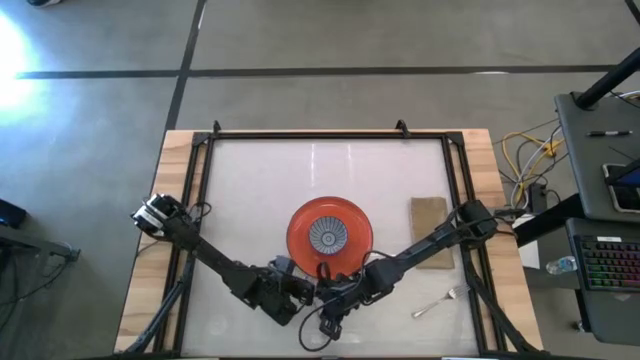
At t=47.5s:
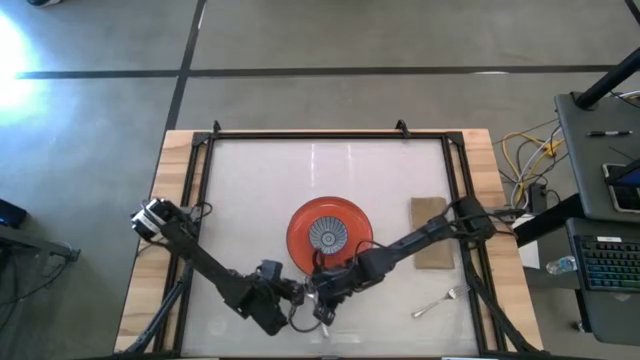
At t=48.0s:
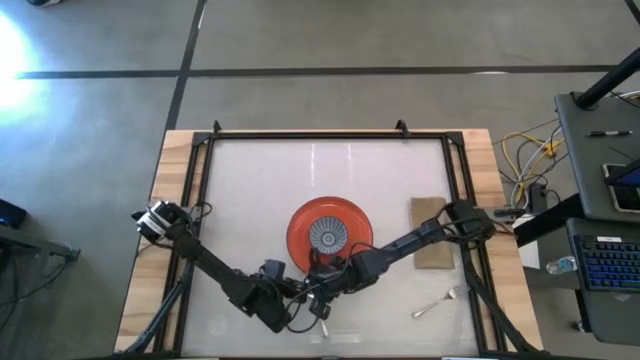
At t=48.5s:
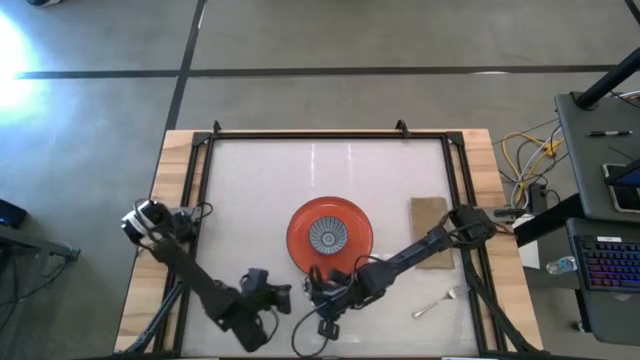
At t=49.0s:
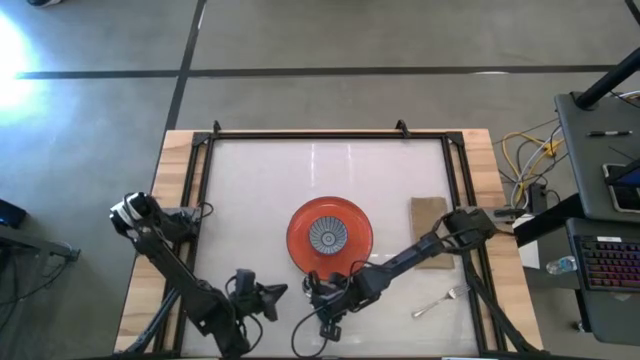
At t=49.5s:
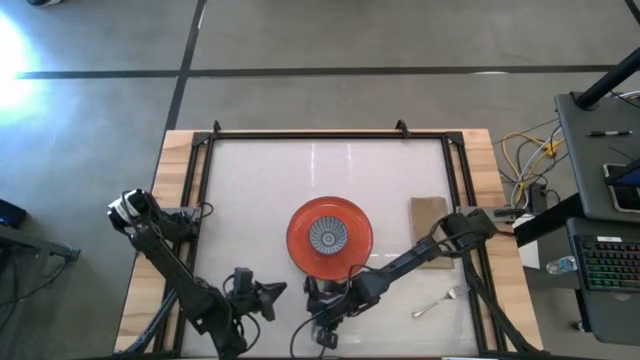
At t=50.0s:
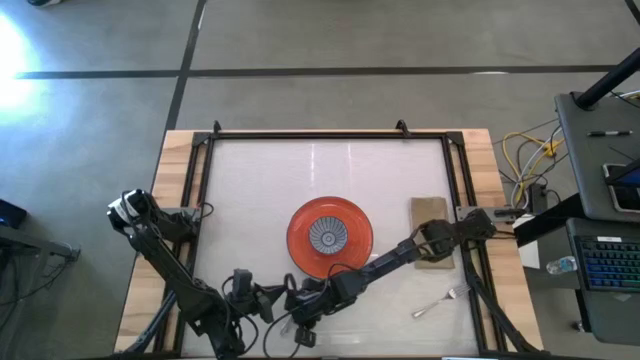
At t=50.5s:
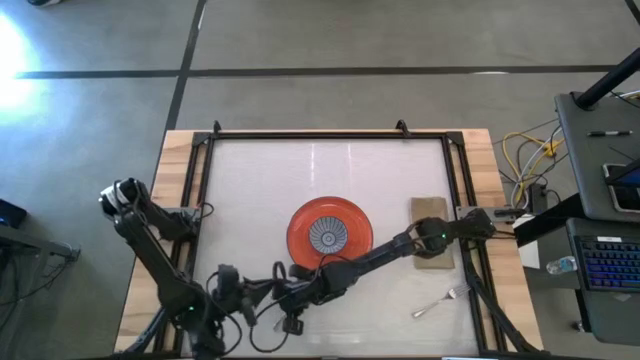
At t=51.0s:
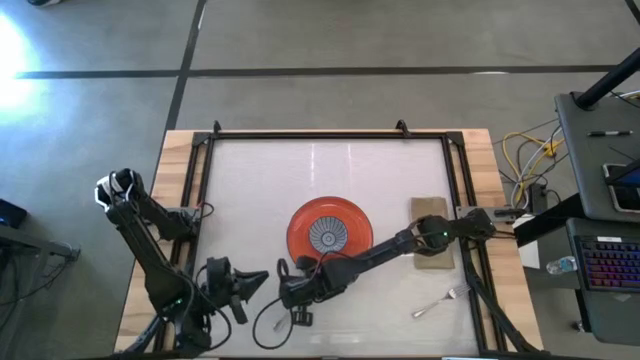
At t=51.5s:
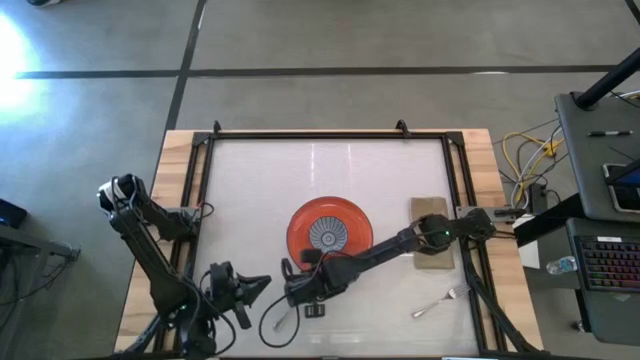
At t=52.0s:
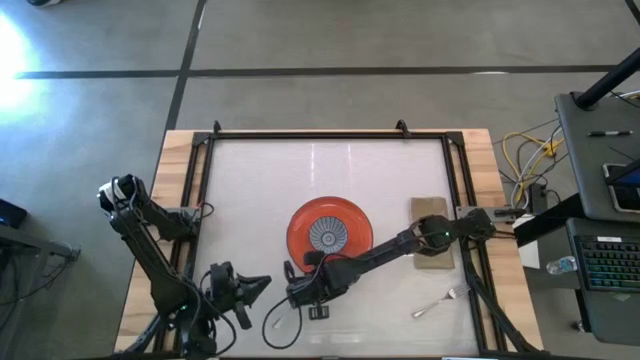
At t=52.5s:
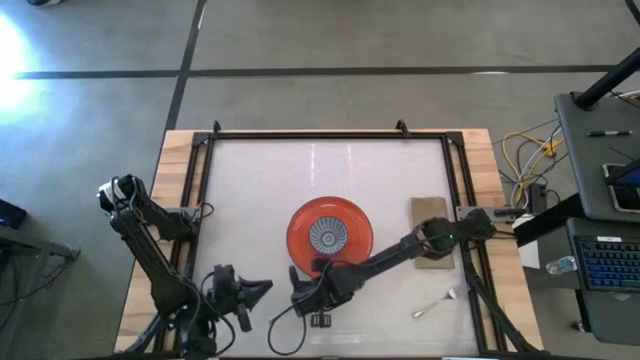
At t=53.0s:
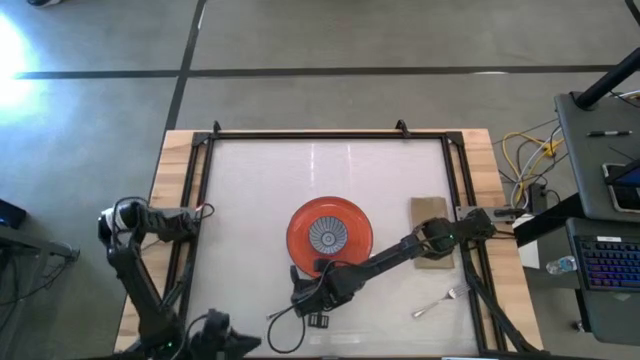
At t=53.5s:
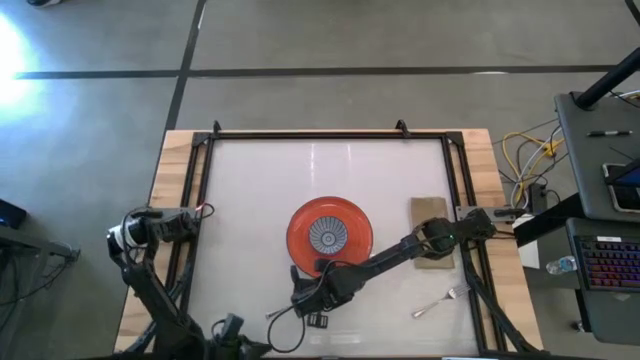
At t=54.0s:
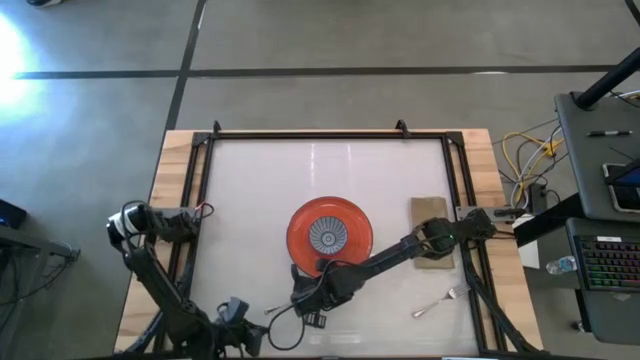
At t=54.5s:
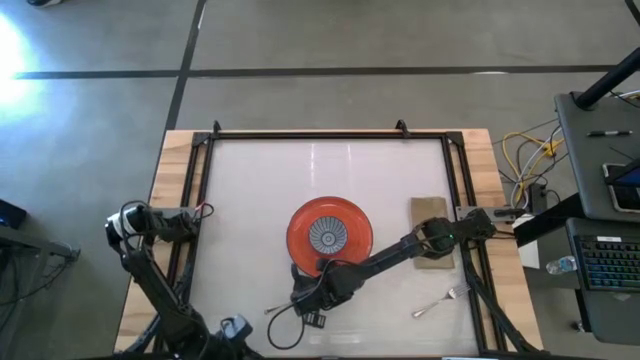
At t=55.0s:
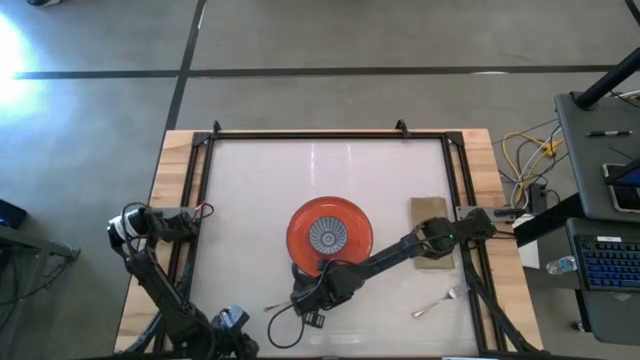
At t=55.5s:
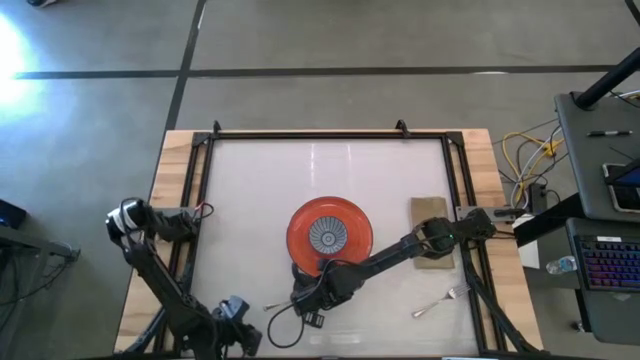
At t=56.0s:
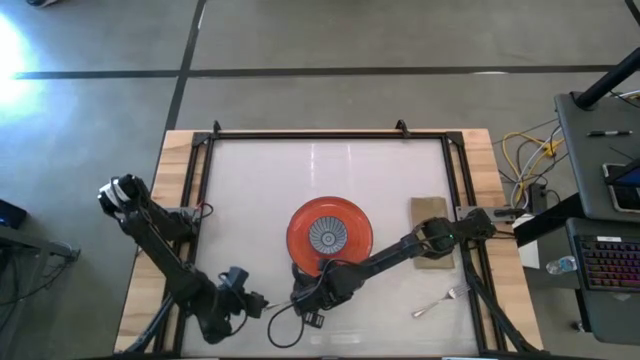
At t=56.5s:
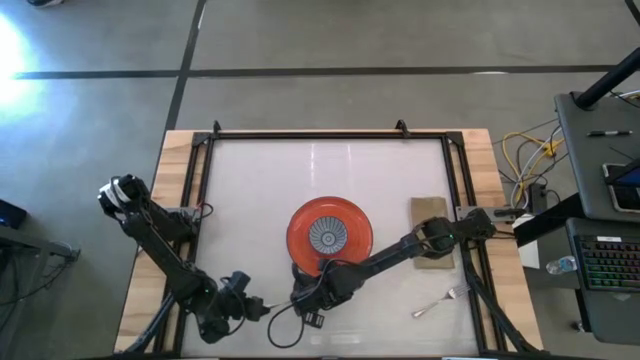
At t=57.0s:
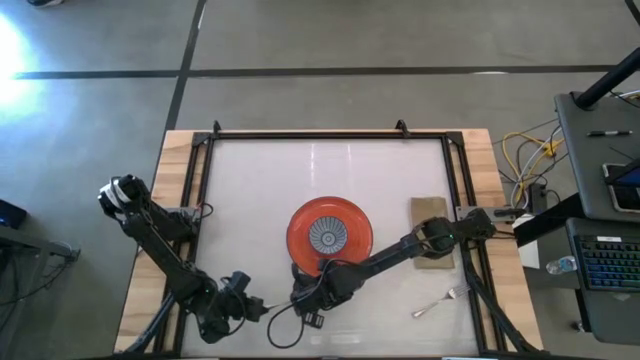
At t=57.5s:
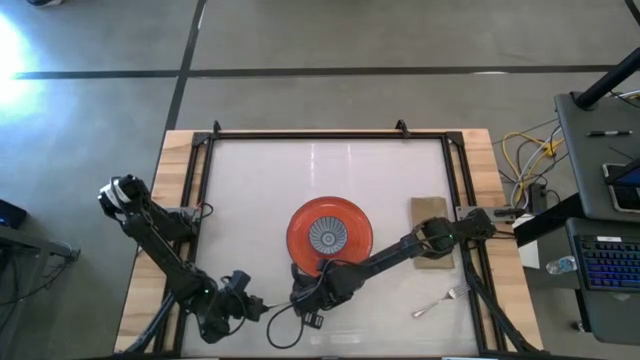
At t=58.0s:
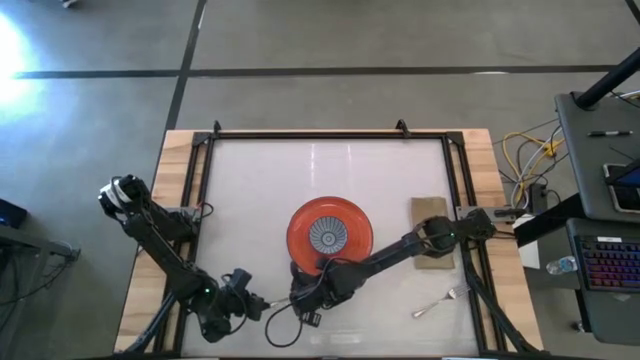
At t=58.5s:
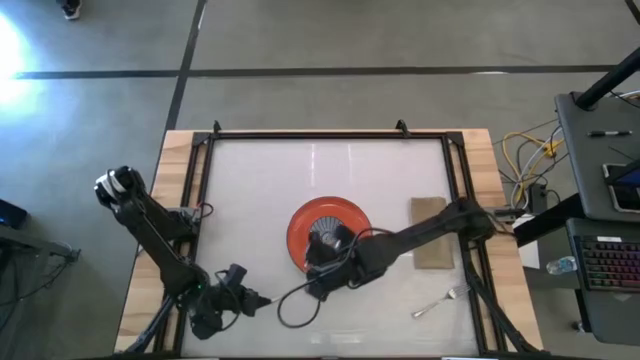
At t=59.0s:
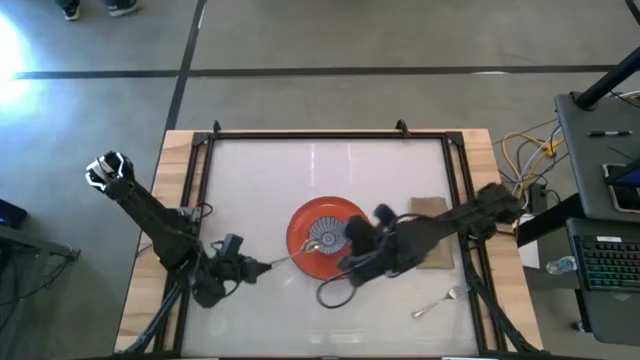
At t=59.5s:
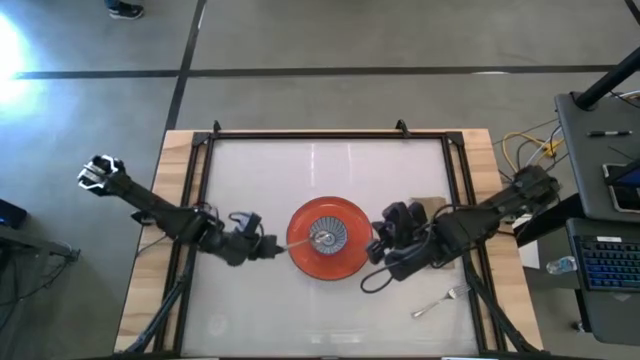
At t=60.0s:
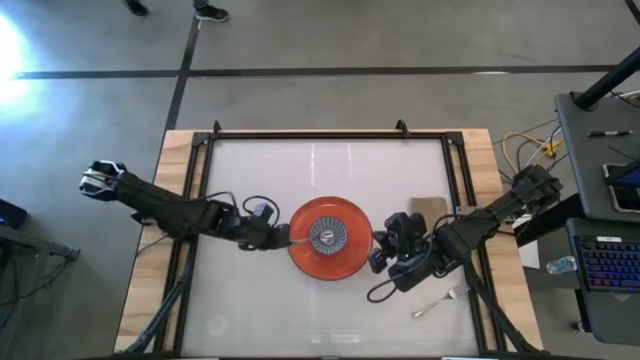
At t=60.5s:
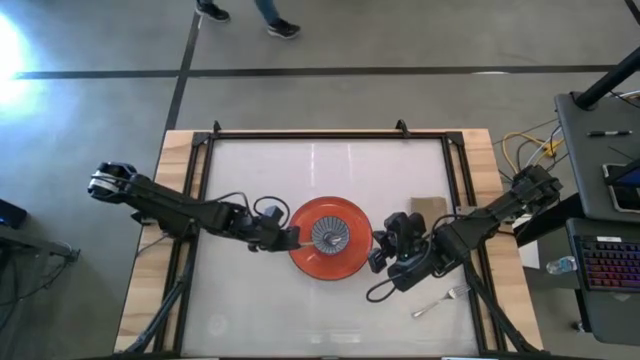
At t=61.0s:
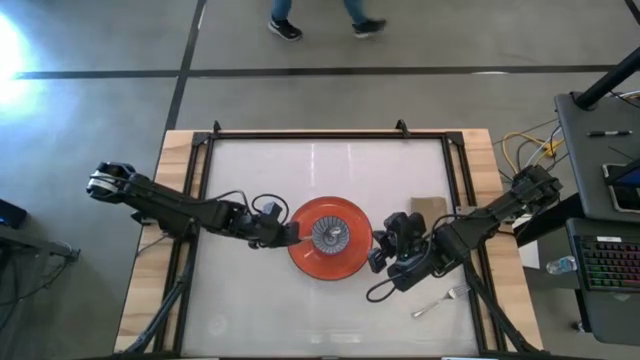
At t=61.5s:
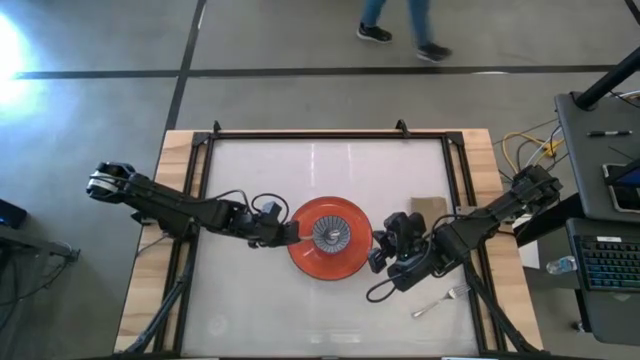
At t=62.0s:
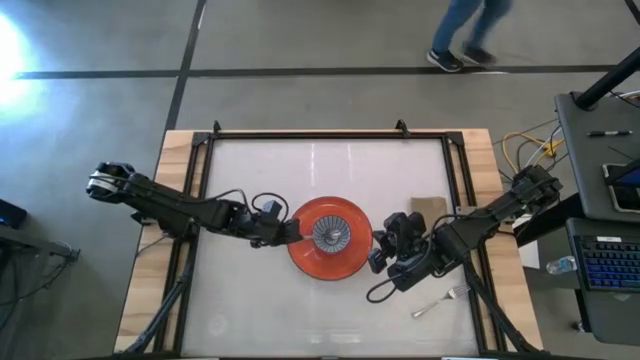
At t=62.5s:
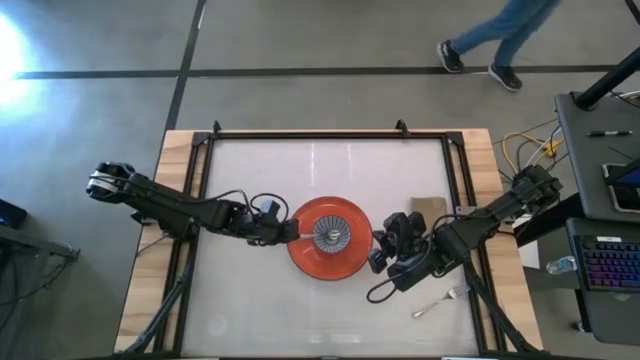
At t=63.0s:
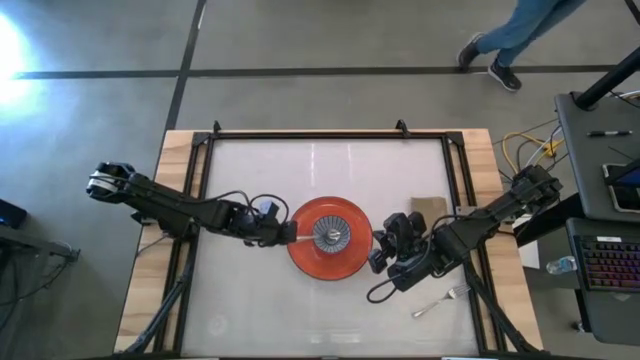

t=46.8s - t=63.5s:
Task: Set table place
Put the spoon into the blue bowl

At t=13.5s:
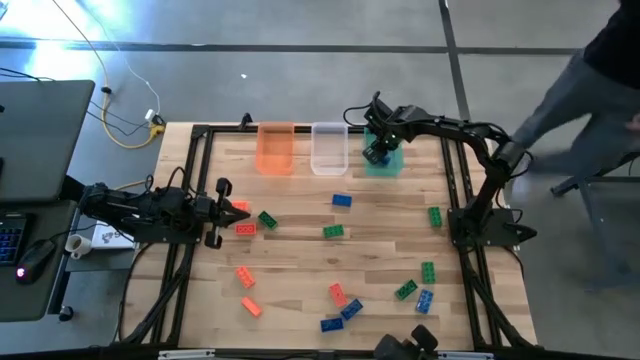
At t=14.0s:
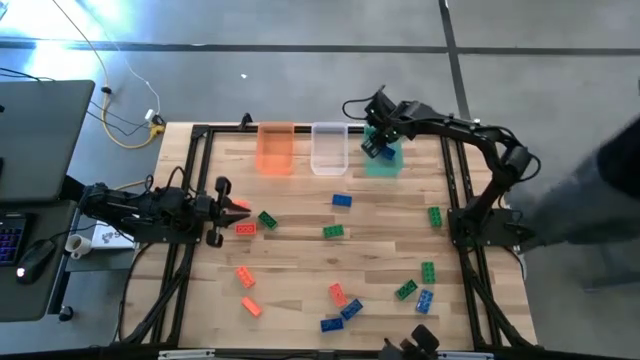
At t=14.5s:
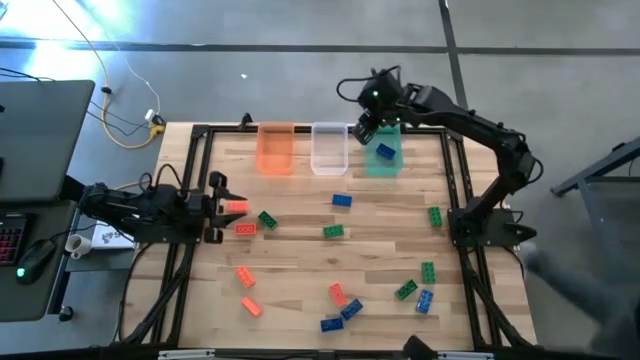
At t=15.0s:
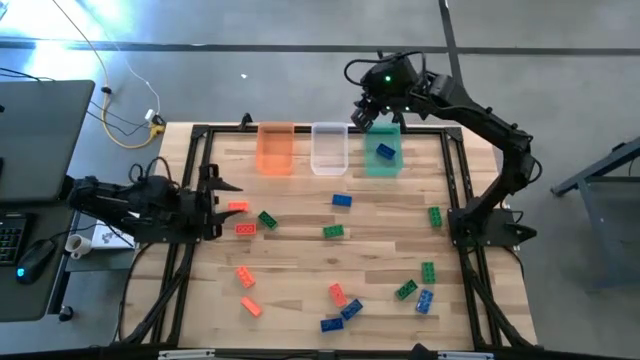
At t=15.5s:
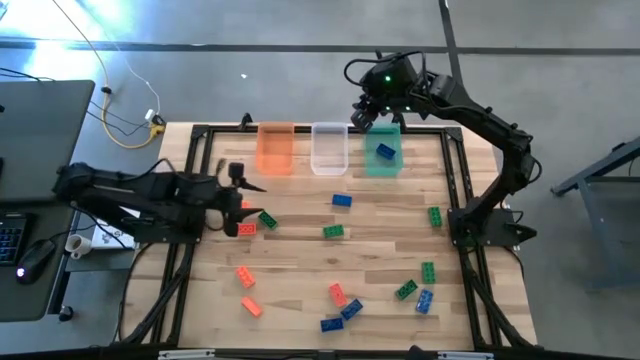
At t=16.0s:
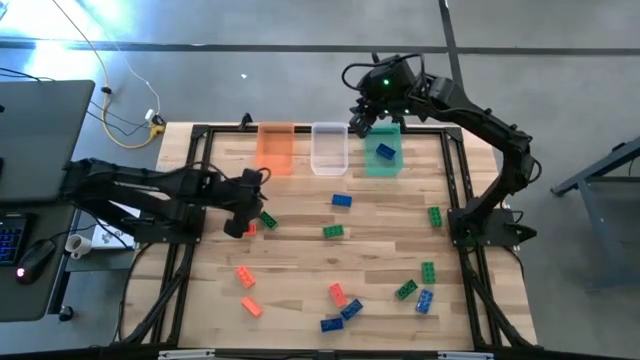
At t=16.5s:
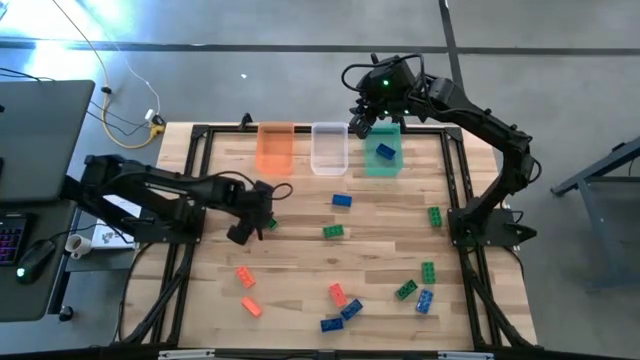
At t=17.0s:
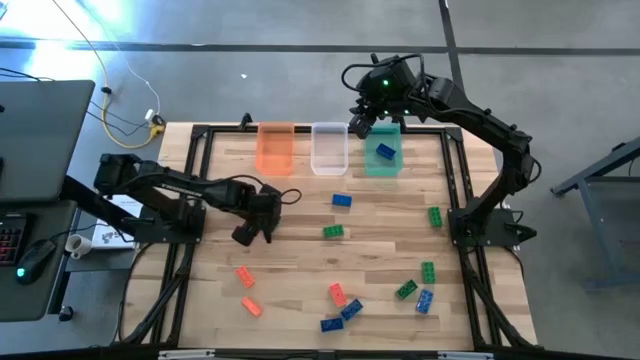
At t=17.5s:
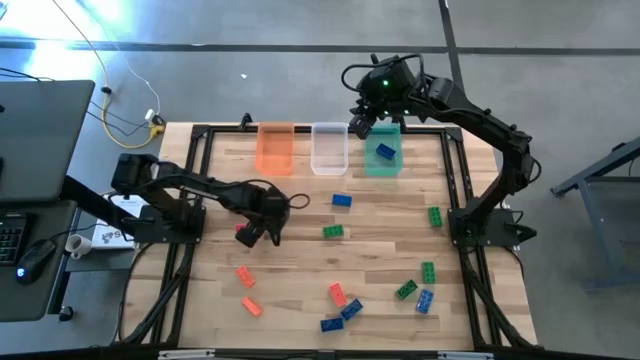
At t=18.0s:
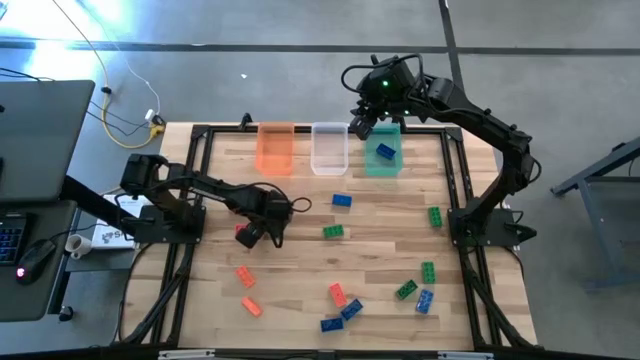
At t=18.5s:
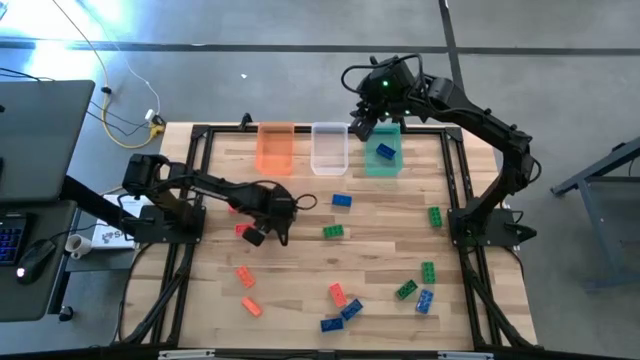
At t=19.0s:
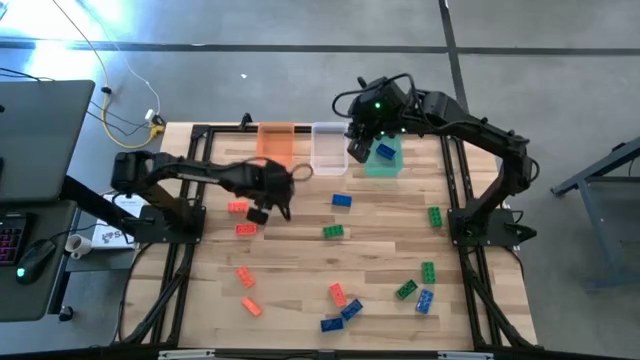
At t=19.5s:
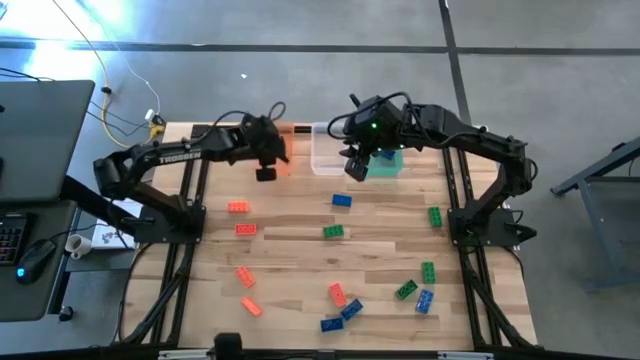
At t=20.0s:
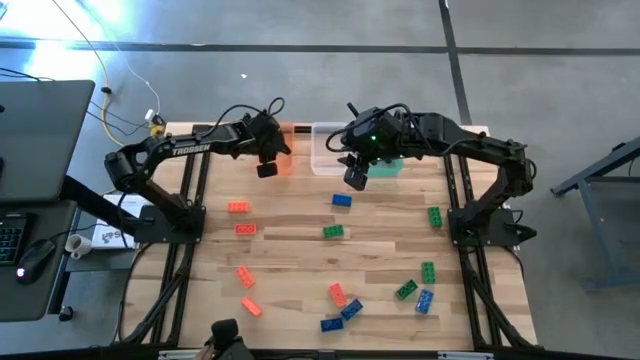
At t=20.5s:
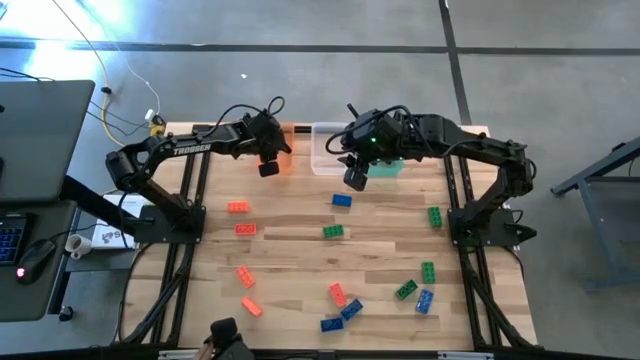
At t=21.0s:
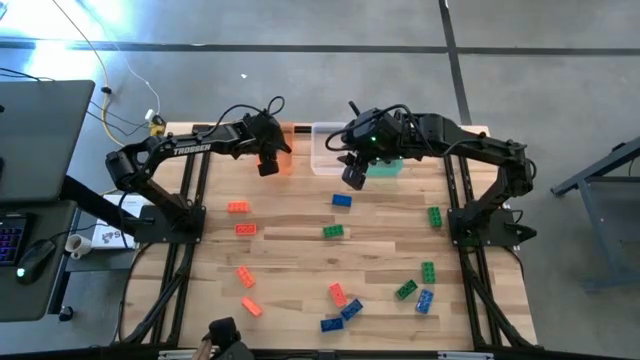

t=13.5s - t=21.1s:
Task: Sort & place blocks by color
Put the green game piece into the orange bin
